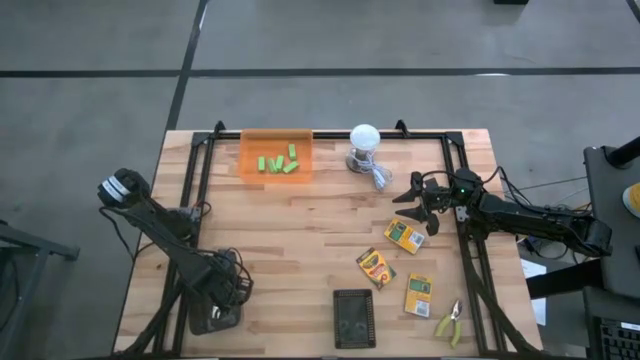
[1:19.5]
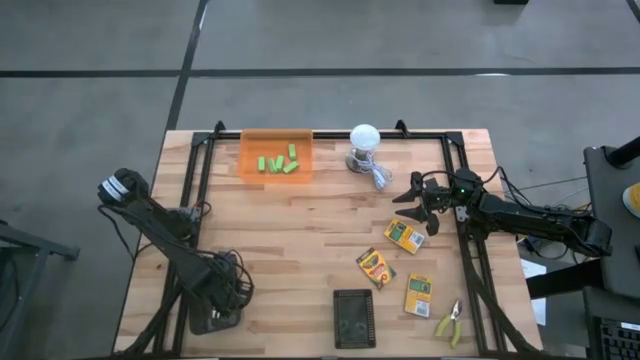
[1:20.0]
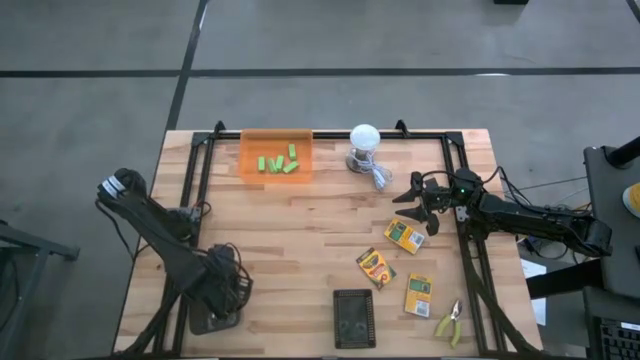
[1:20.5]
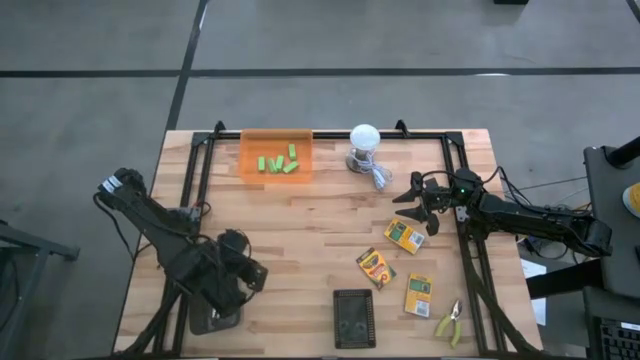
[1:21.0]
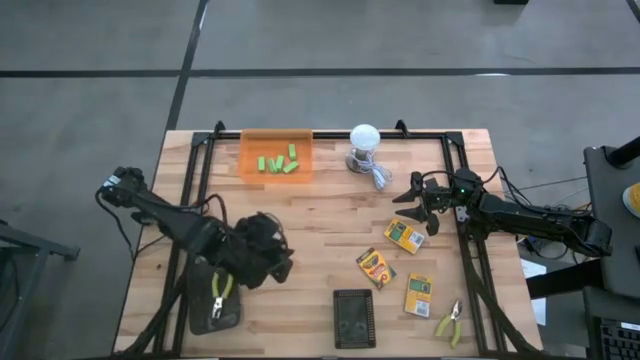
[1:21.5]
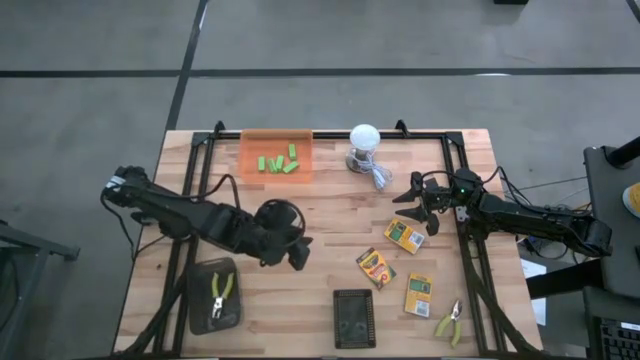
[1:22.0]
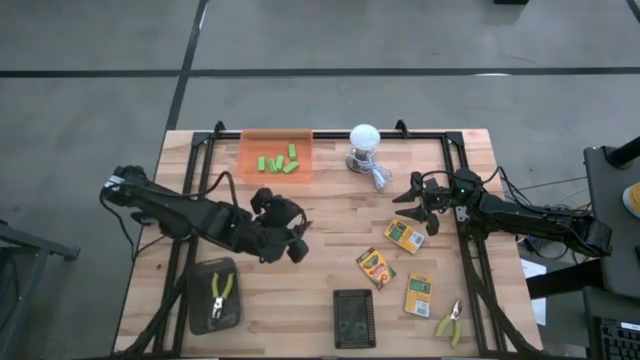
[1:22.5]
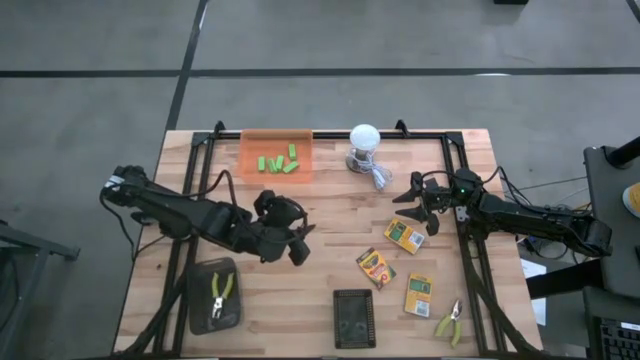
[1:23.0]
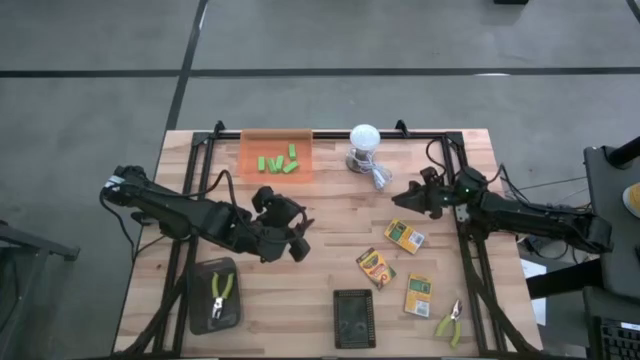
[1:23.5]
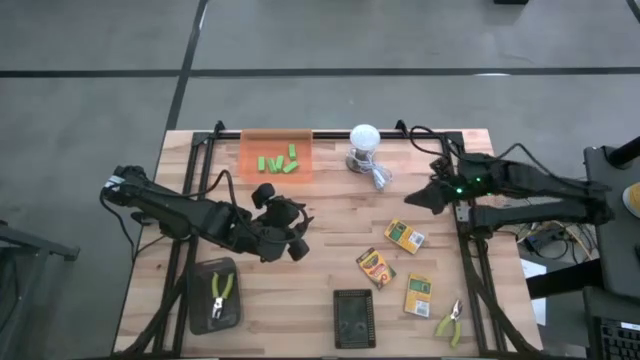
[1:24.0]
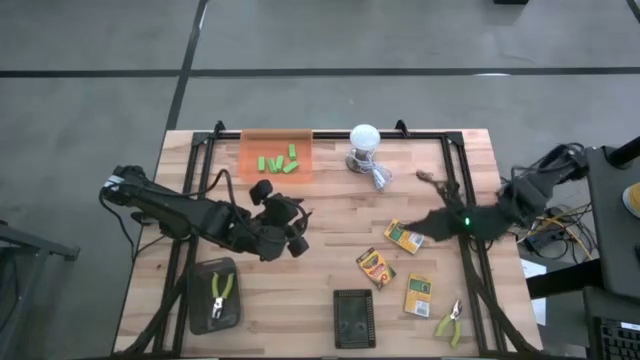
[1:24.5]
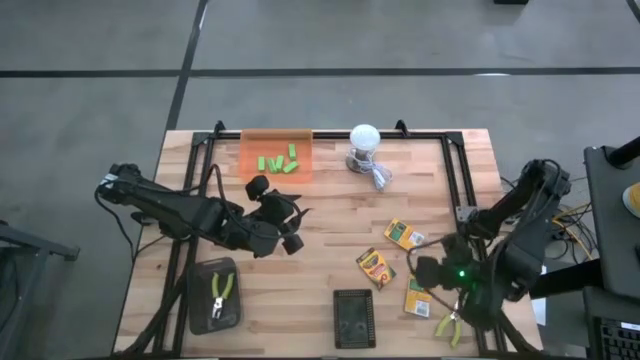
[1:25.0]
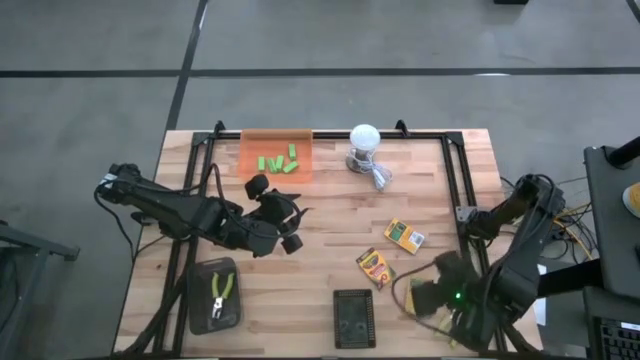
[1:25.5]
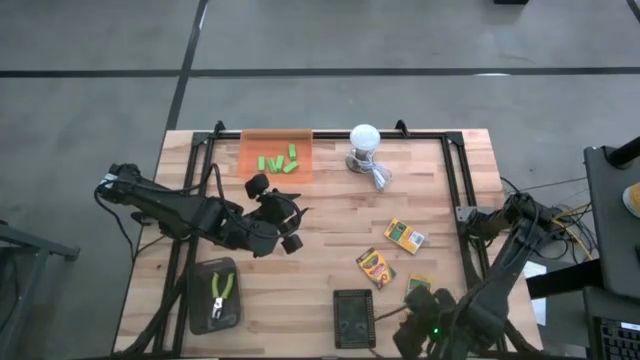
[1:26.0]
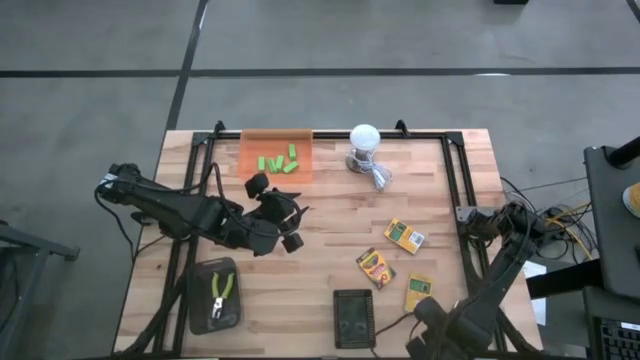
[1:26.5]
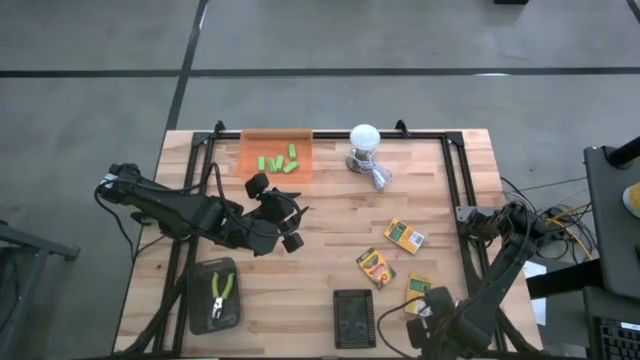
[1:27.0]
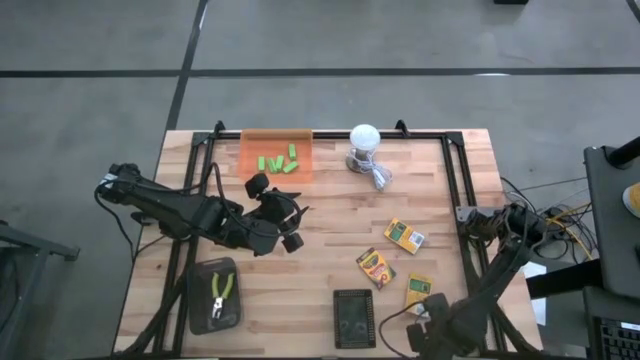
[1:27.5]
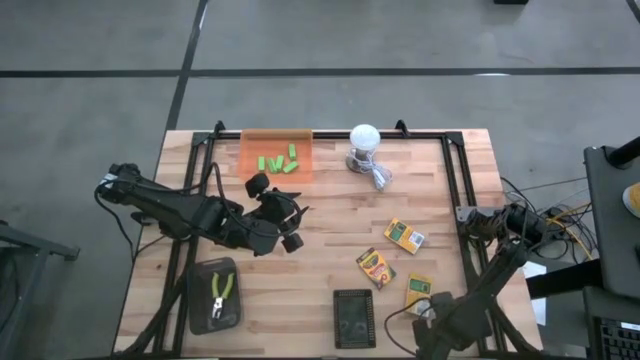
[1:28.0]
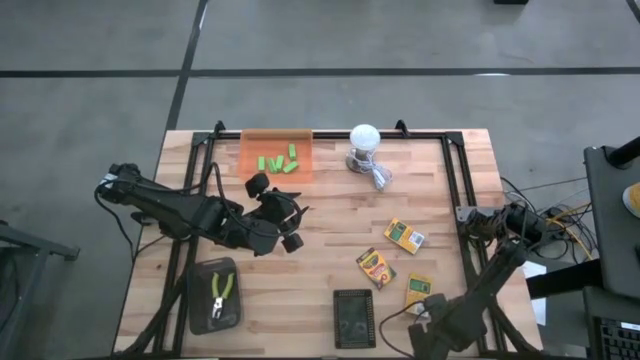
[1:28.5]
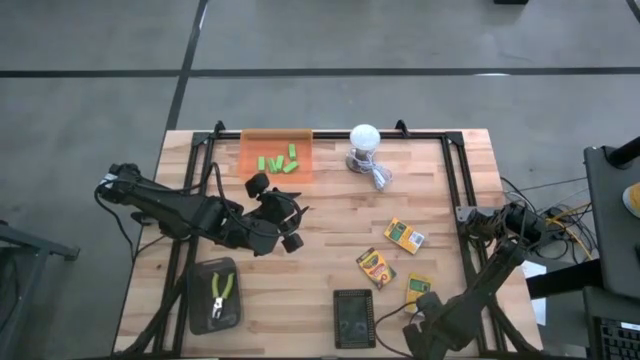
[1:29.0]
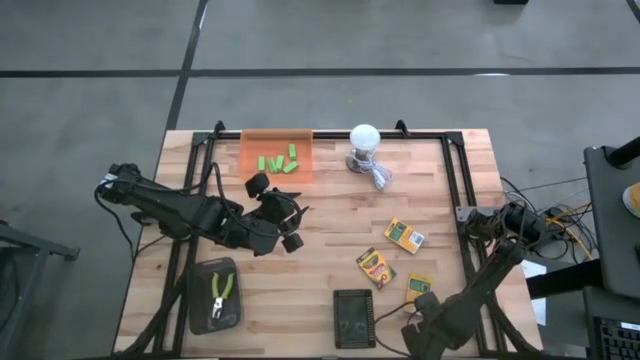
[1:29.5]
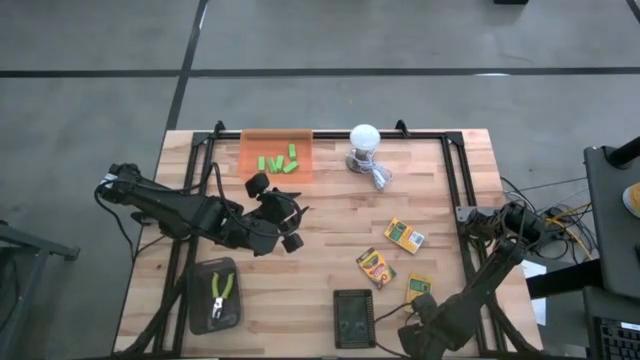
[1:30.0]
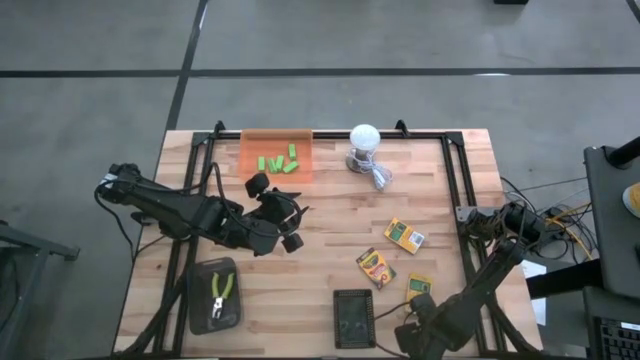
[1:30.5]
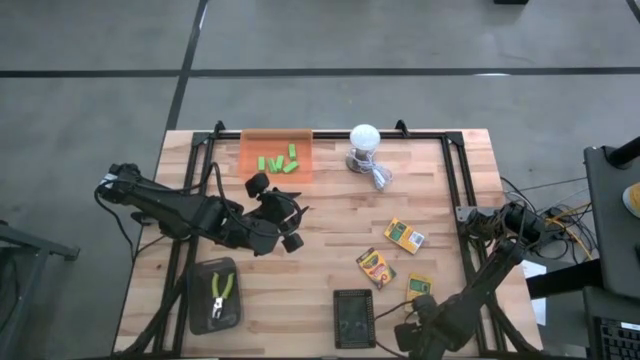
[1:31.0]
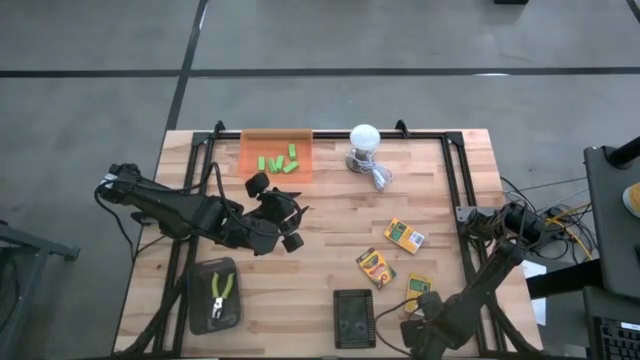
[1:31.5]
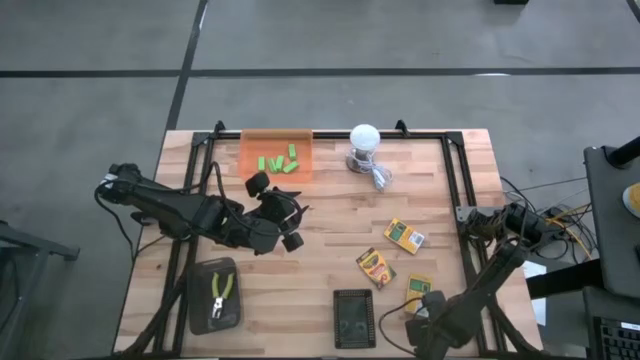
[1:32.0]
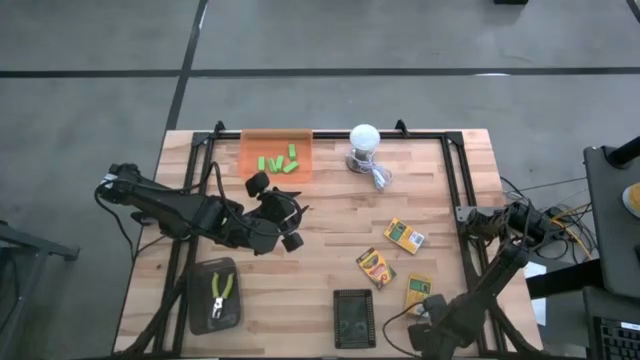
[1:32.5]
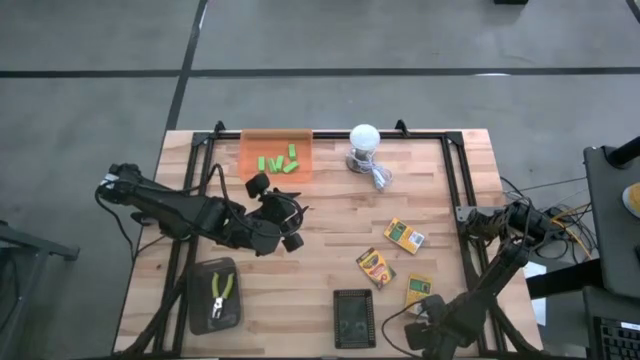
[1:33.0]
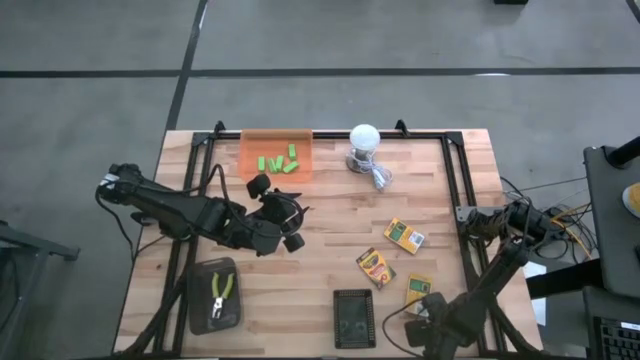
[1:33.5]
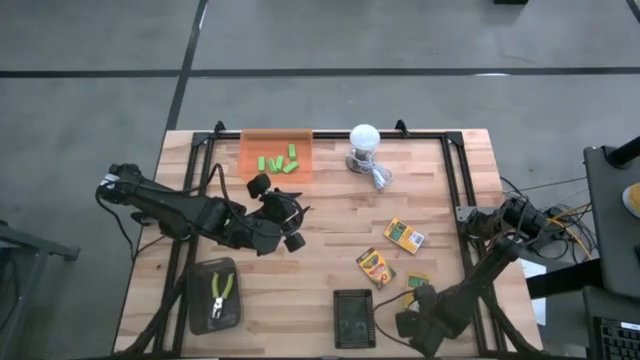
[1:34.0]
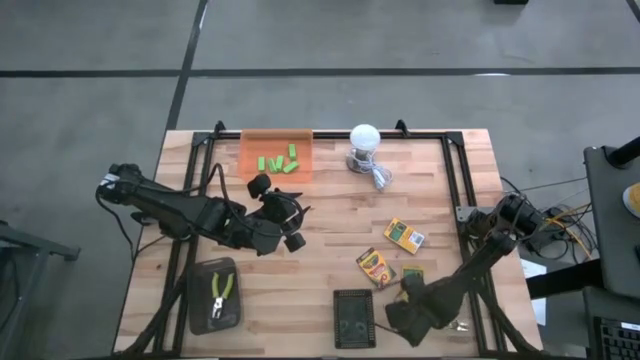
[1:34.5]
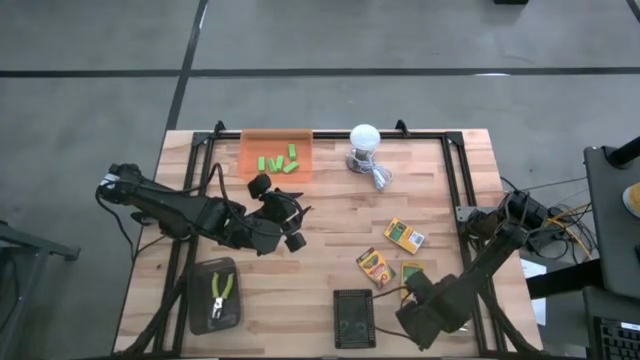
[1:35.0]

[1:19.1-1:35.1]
Task: Pick & Place School Supplies
Put the green hole puncher into the left black bin
